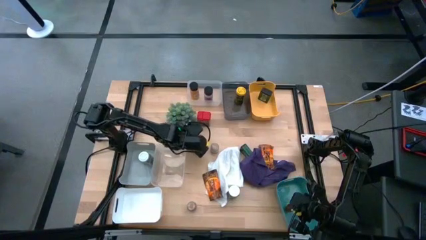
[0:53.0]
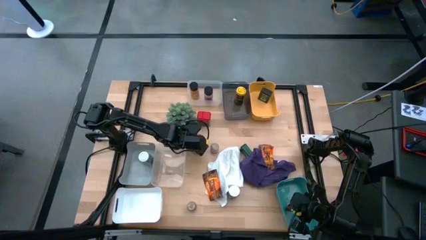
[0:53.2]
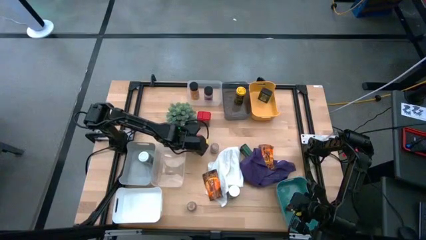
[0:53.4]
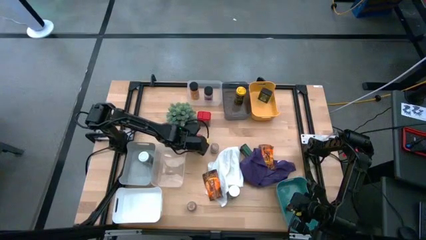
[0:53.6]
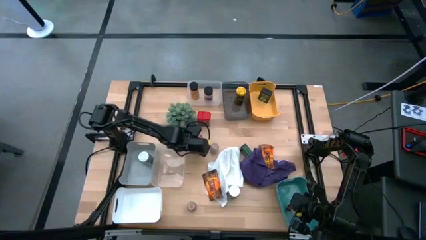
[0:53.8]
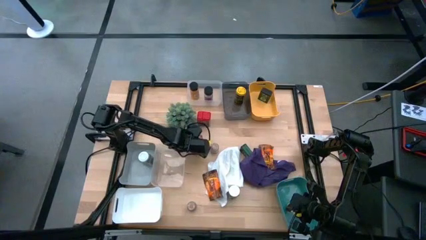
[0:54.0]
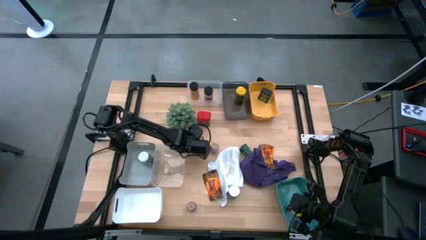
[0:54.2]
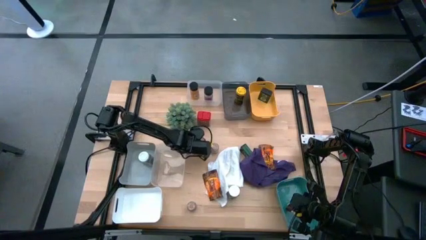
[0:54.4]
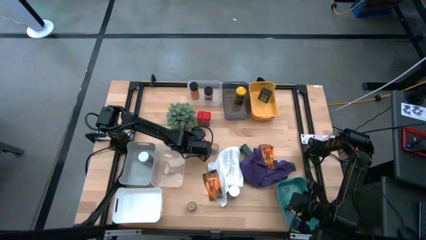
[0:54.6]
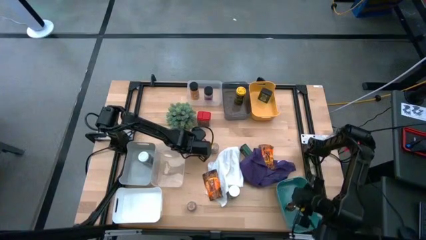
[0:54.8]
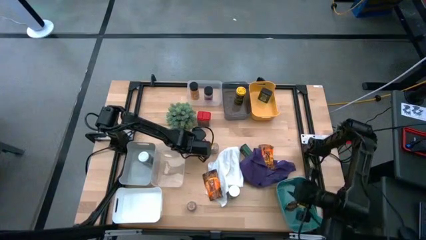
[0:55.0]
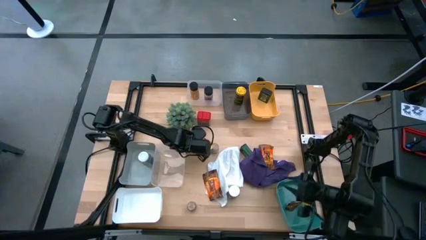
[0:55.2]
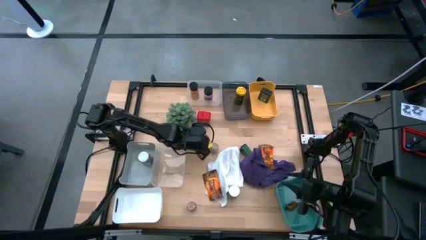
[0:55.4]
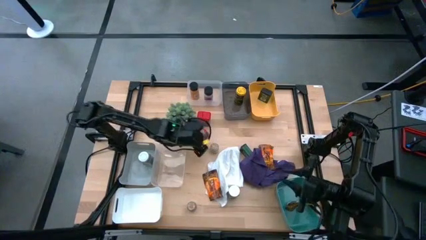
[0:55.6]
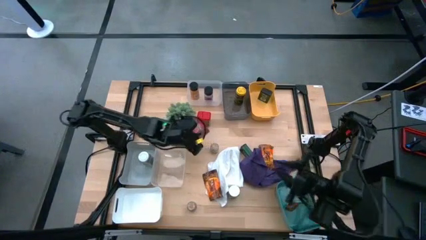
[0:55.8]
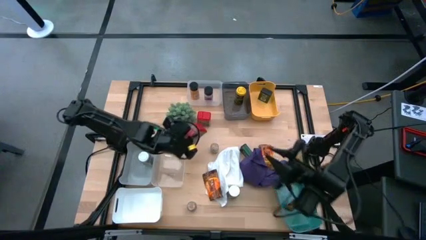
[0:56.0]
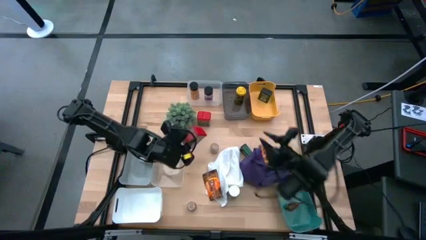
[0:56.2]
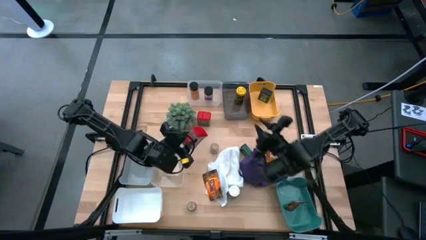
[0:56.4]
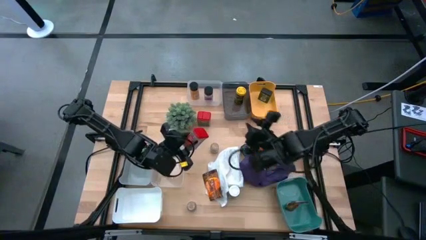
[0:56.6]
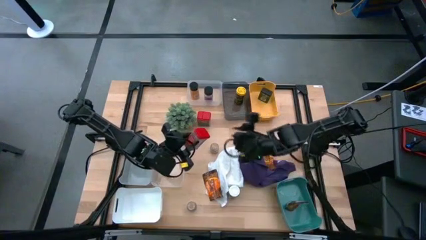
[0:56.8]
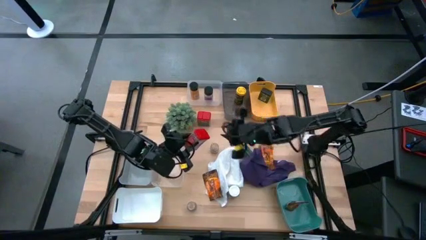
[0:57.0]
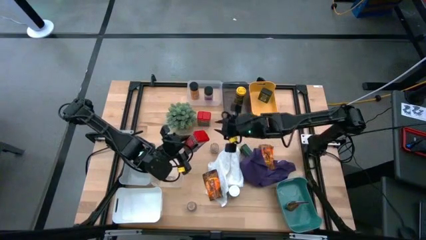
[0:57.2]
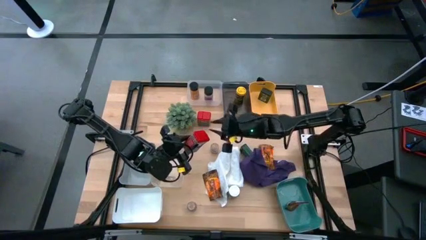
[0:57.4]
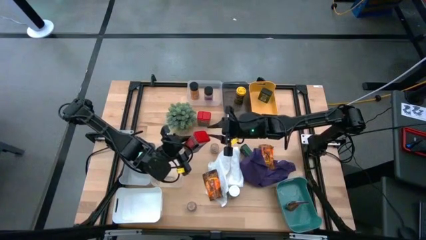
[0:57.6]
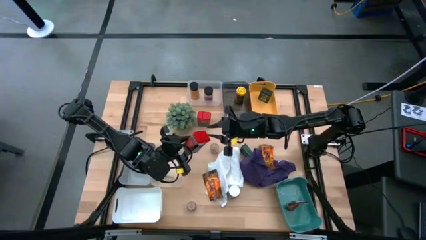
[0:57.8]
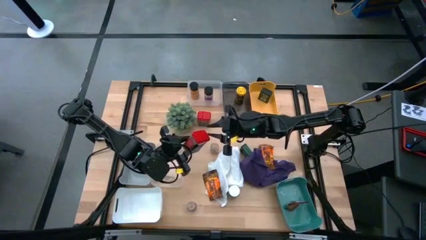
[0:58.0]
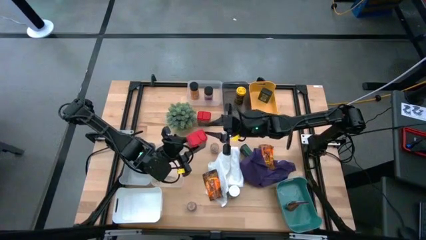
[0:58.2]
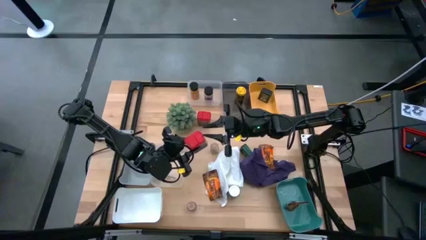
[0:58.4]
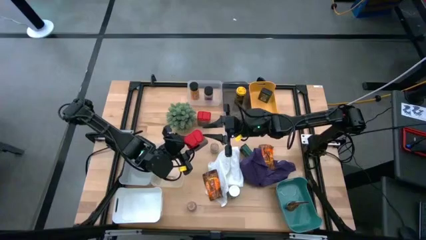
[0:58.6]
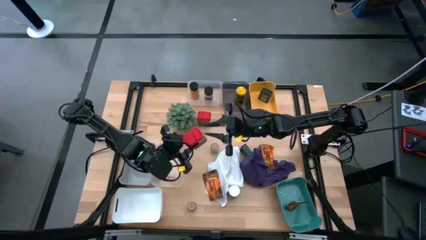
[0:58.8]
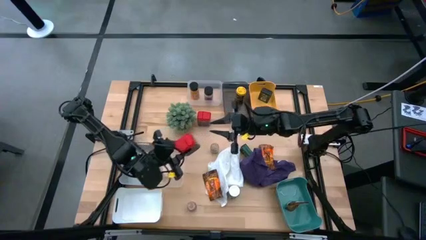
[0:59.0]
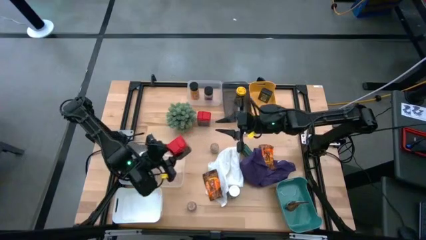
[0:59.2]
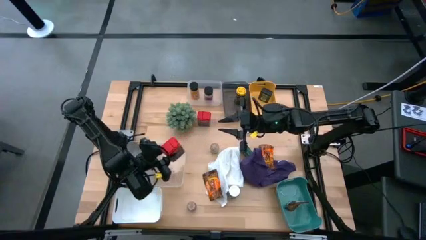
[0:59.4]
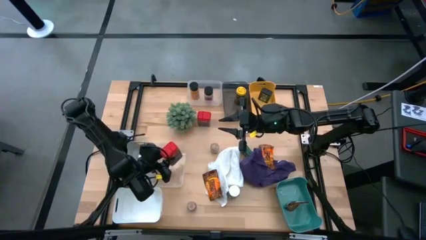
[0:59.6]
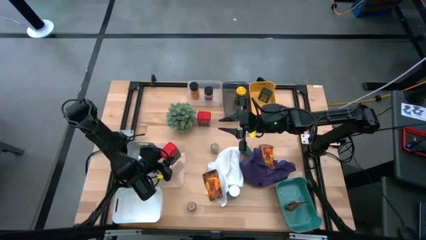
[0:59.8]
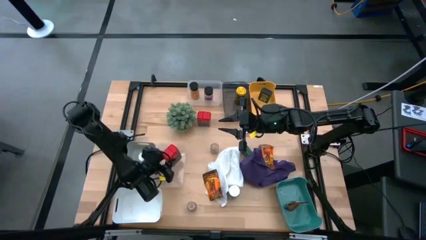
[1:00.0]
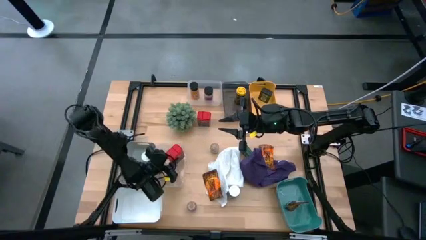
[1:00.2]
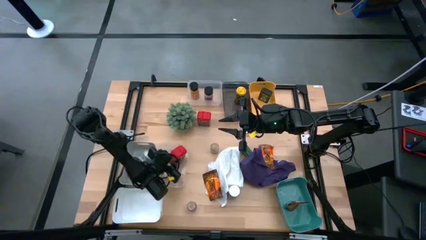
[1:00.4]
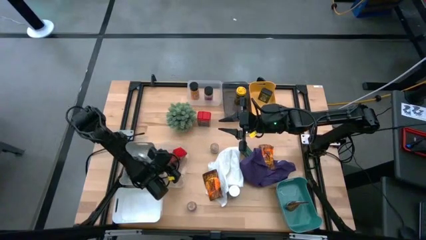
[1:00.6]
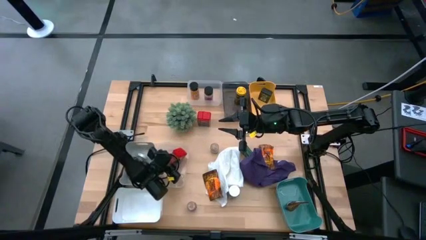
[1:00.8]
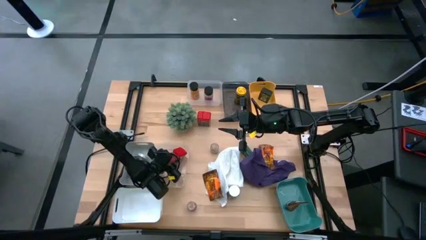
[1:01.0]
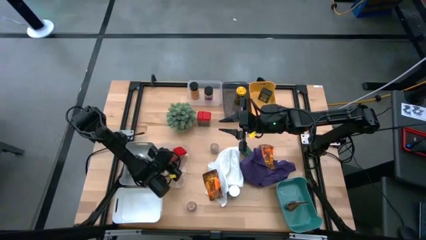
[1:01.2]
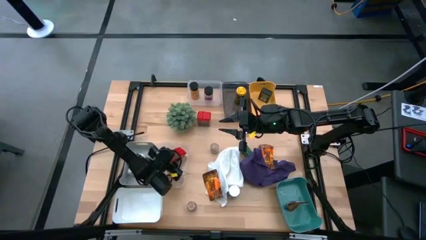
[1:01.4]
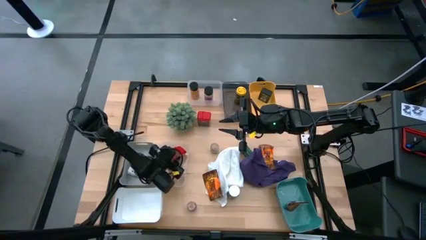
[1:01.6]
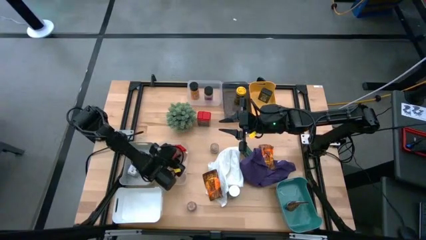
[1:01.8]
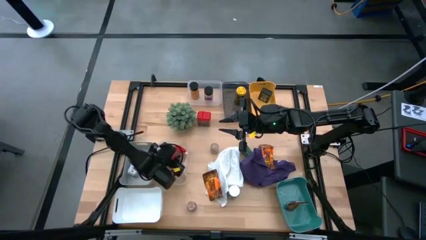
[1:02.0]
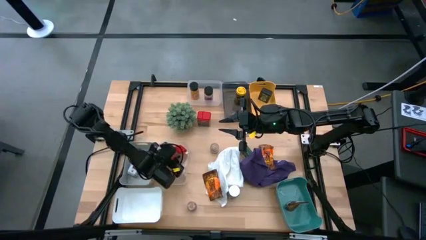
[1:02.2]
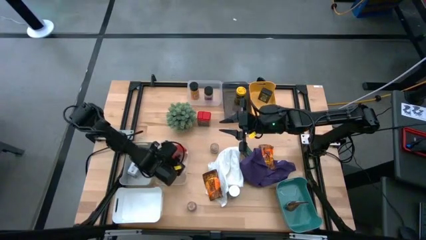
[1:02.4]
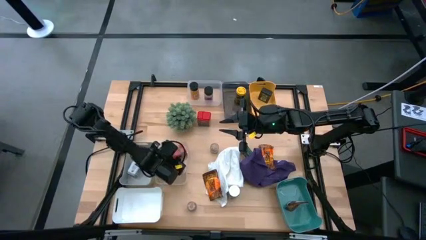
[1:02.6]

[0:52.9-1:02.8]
Task: Sort spices by type
Put the bottom red seasoning can into the bottom transparent bin

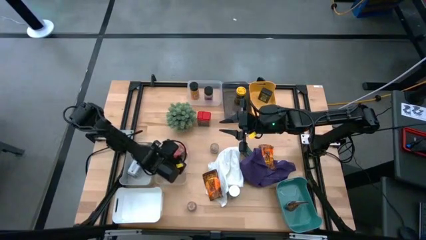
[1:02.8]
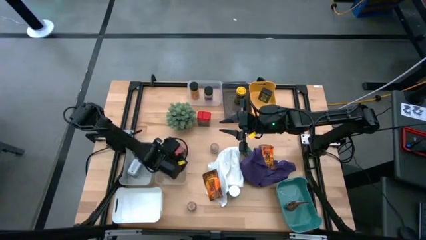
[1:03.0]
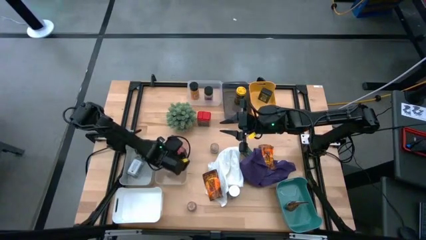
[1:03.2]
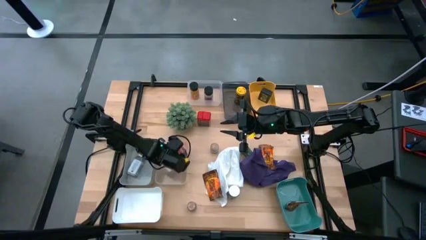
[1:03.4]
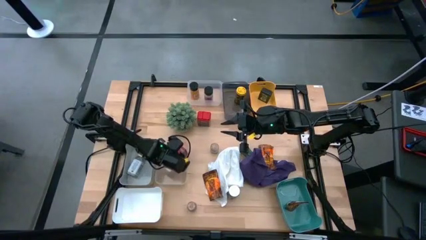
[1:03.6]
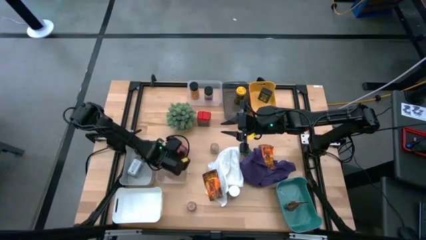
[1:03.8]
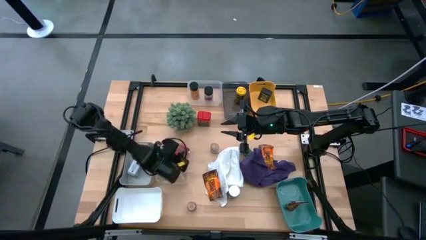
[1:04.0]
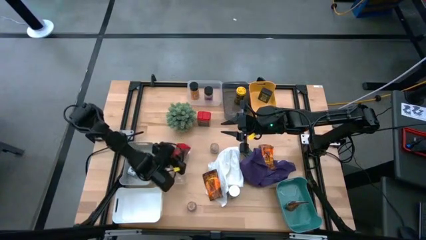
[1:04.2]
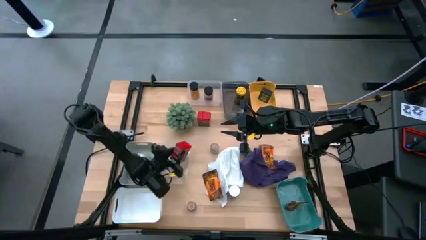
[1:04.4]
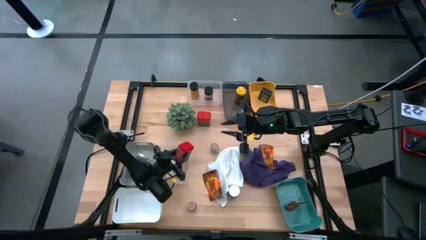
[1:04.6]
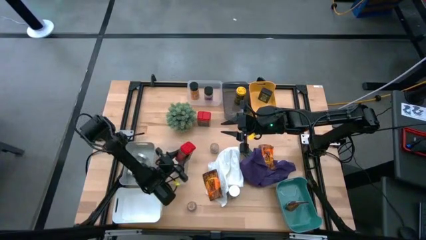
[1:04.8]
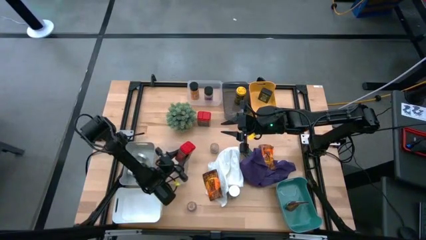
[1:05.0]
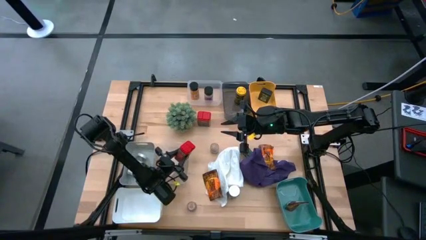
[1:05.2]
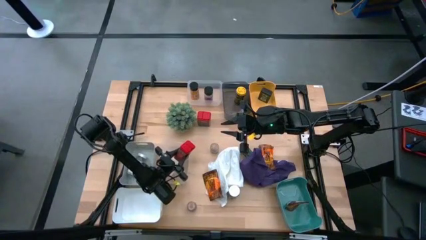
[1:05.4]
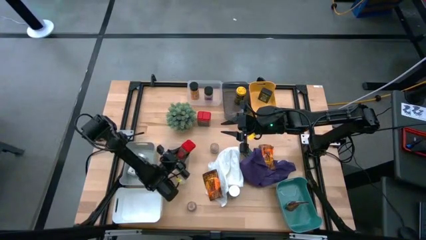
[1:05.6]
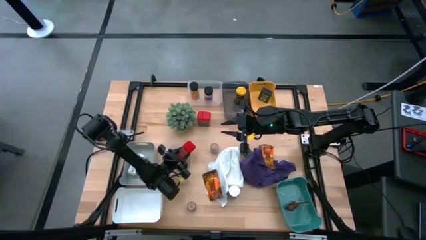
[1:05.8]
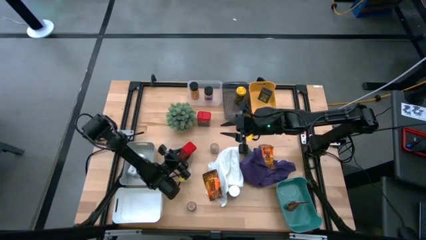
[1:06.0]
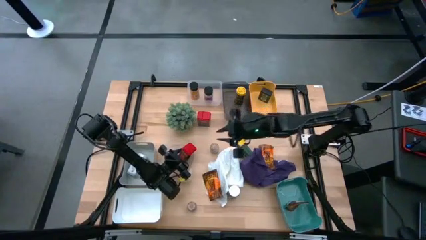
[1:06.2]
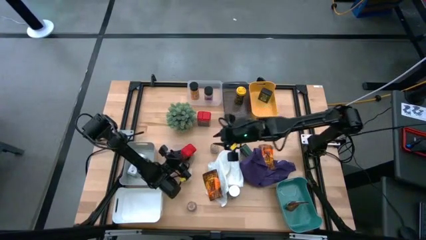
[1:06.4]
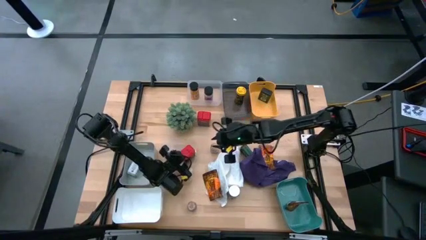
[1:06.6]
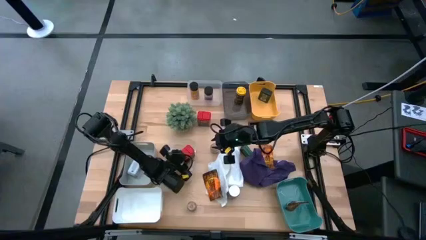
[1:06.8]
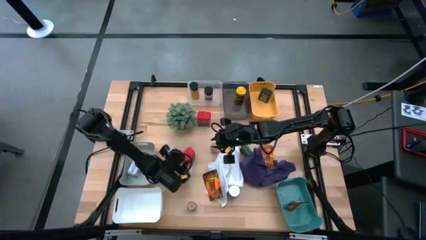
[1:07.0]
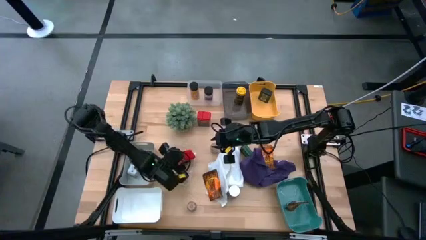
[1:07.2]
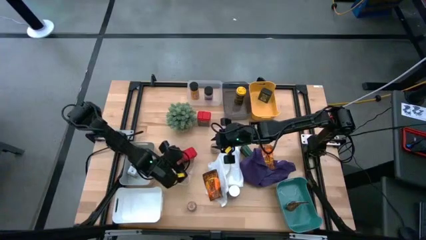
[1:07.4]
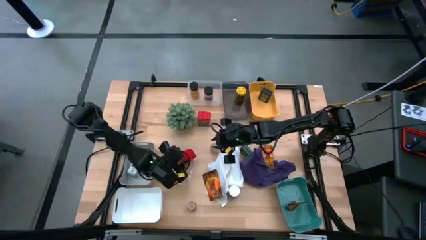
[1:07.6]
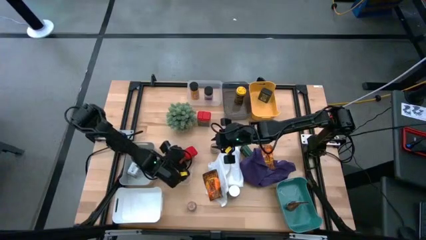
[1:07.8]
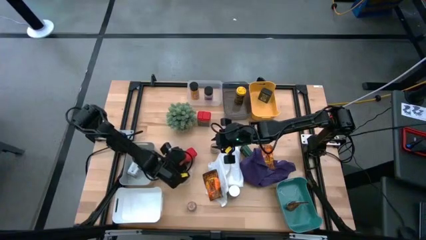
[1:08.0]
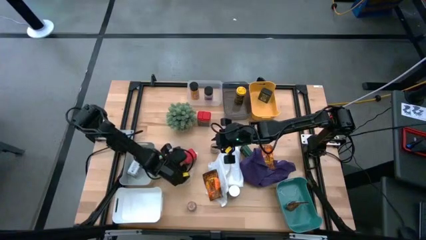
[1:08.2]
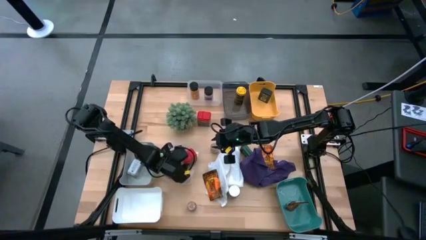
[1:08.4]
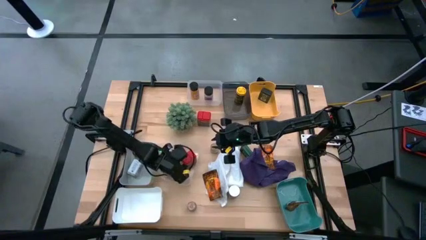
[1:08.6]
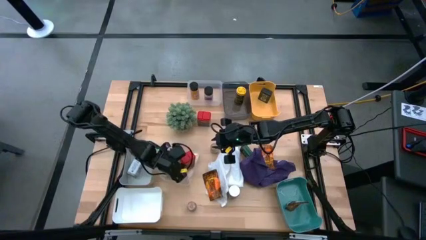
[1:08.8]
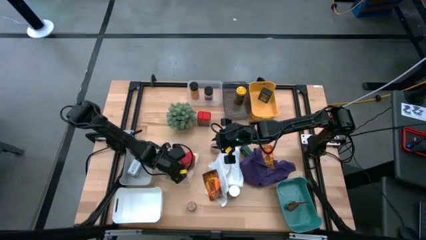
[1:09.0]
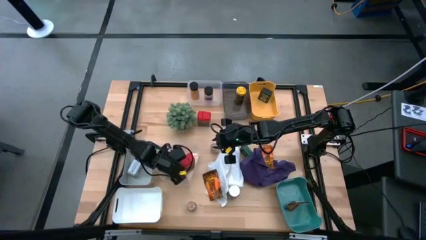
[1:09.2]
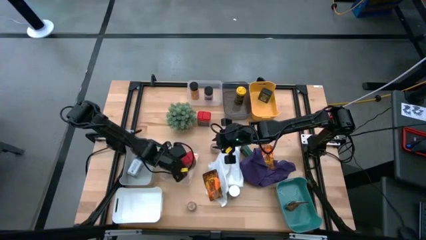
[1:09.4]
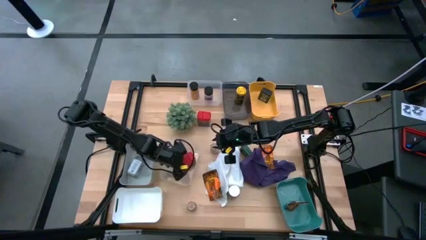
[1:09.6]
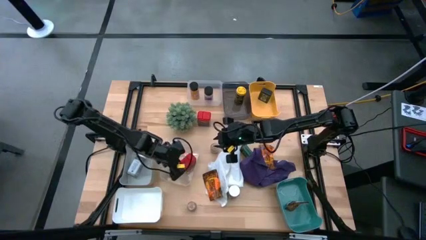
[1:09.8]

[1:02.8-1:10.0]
Adjust the red seasoning can in the bottom transparent bin
